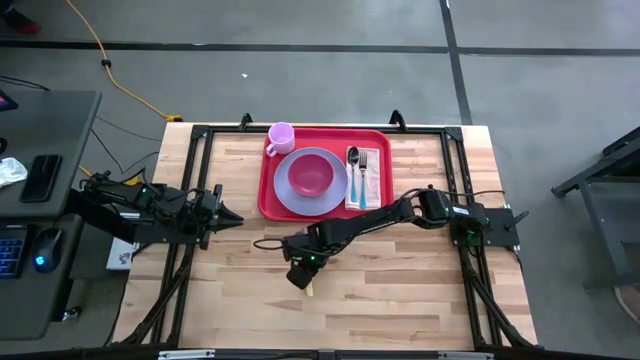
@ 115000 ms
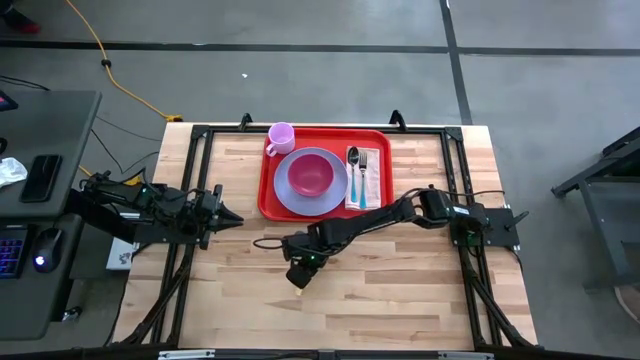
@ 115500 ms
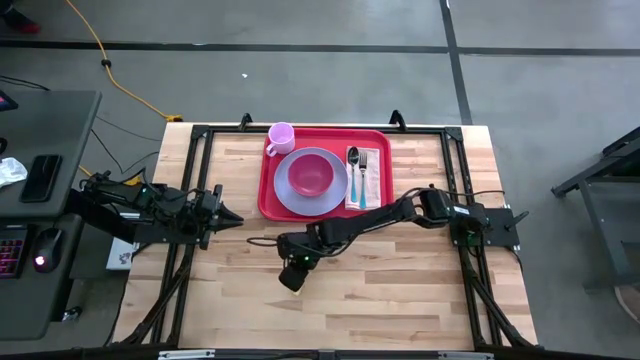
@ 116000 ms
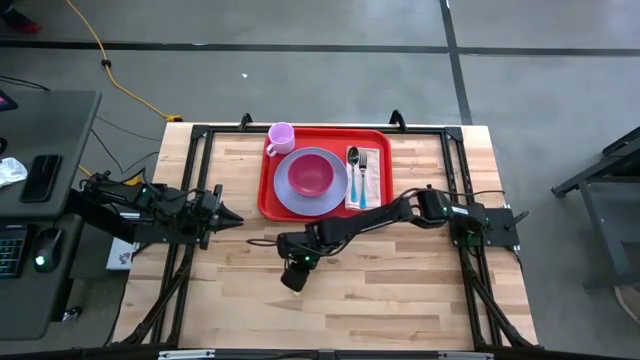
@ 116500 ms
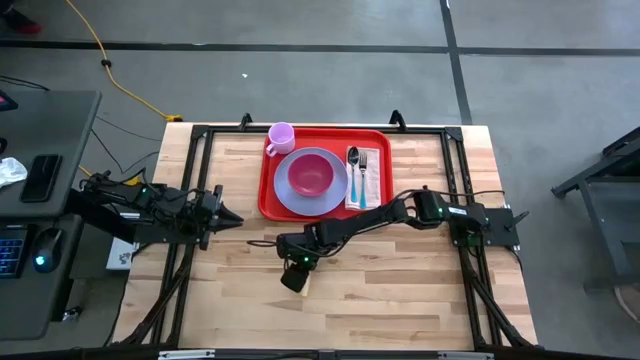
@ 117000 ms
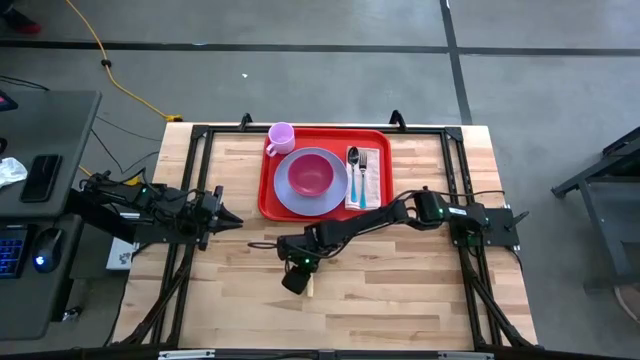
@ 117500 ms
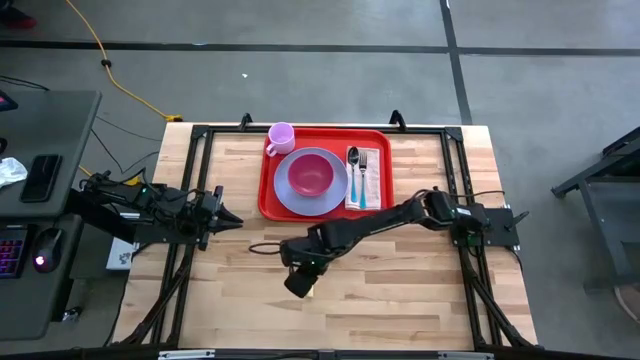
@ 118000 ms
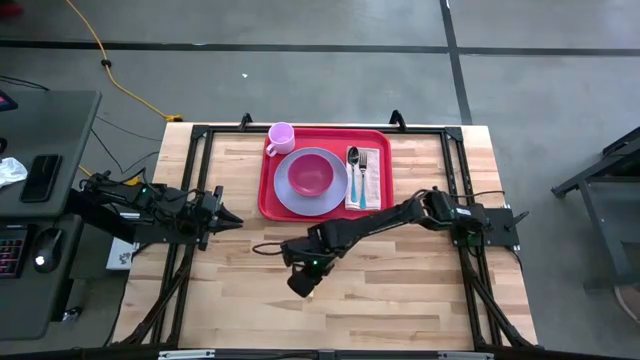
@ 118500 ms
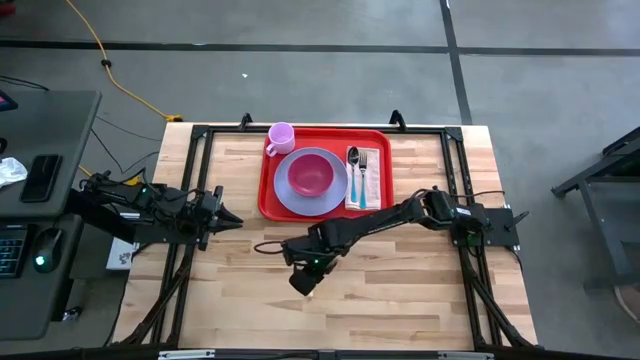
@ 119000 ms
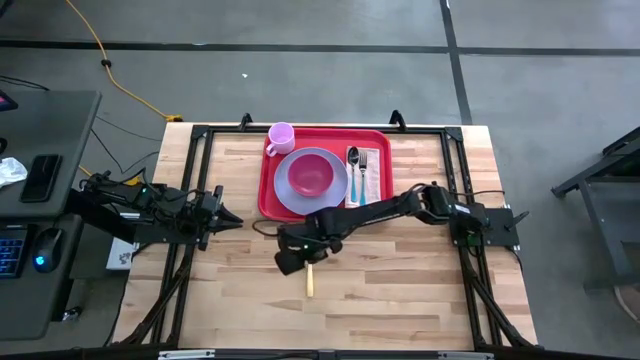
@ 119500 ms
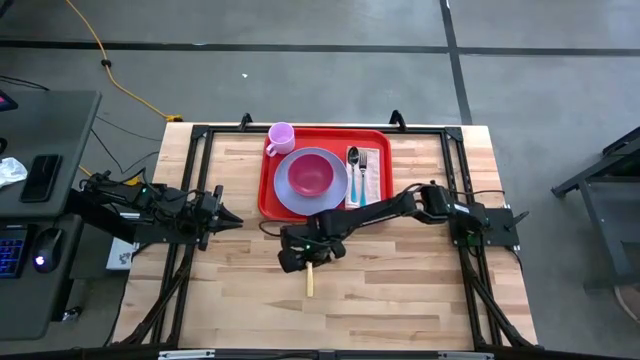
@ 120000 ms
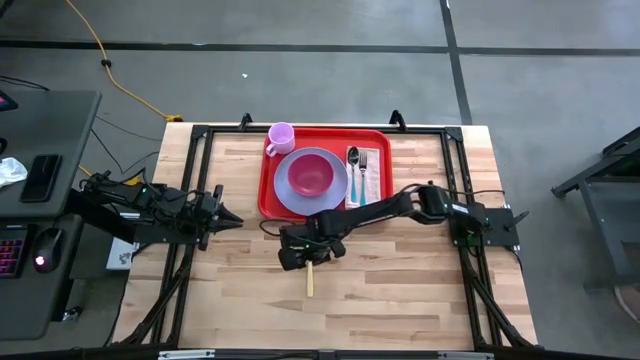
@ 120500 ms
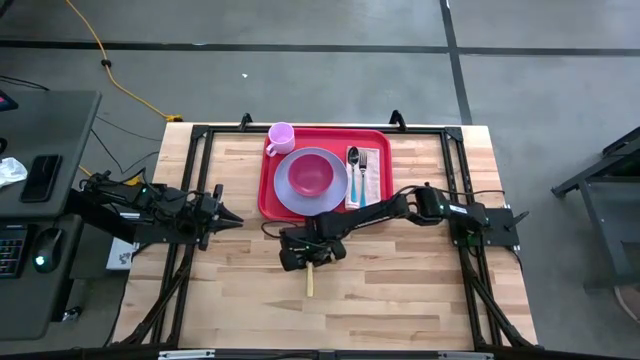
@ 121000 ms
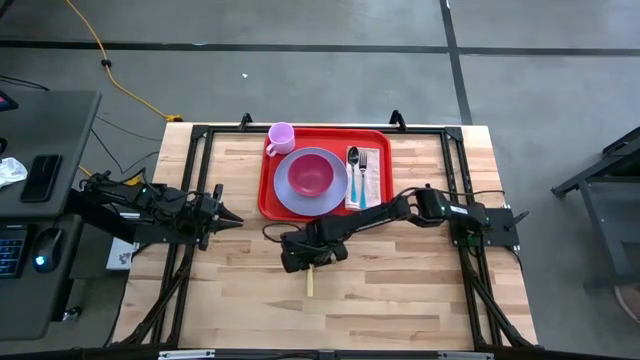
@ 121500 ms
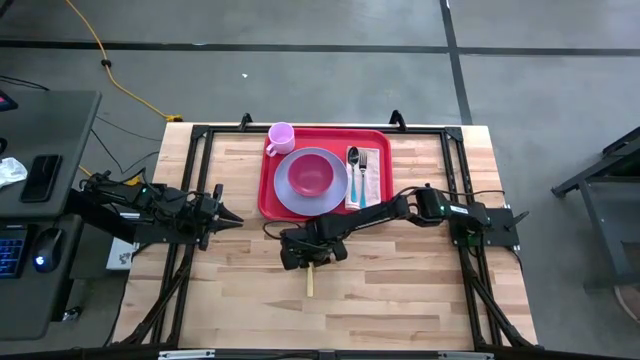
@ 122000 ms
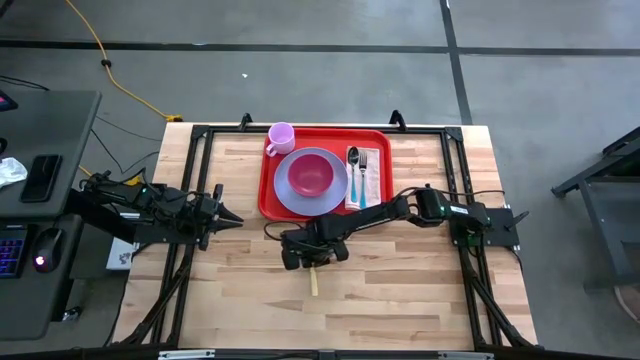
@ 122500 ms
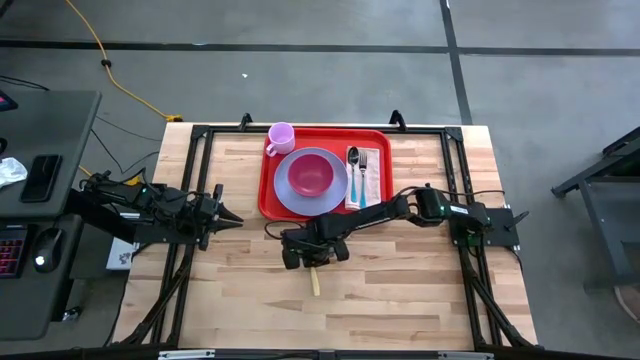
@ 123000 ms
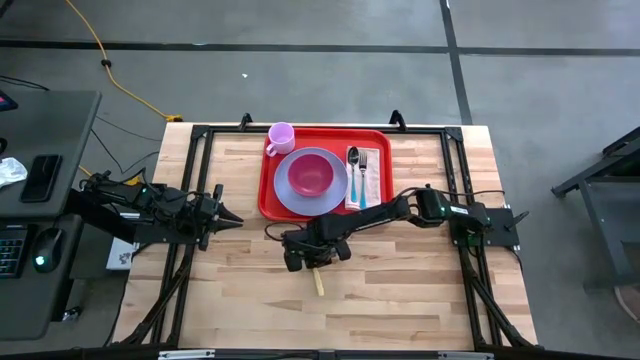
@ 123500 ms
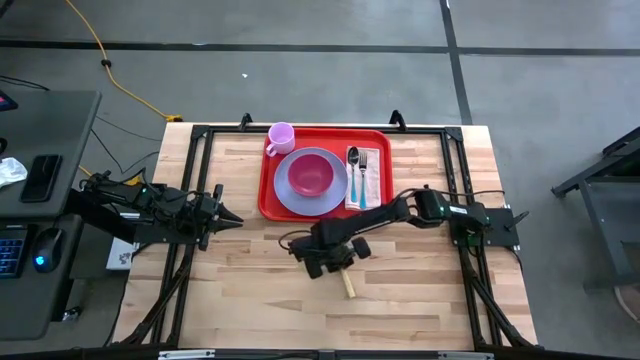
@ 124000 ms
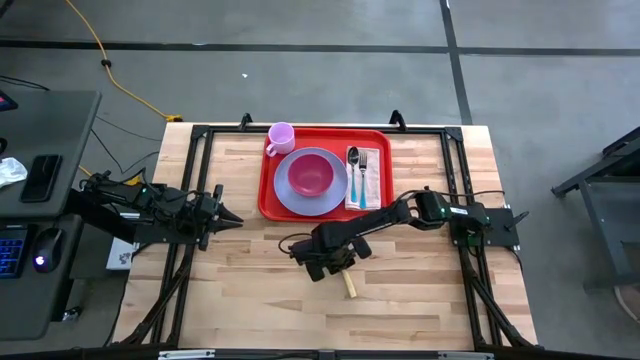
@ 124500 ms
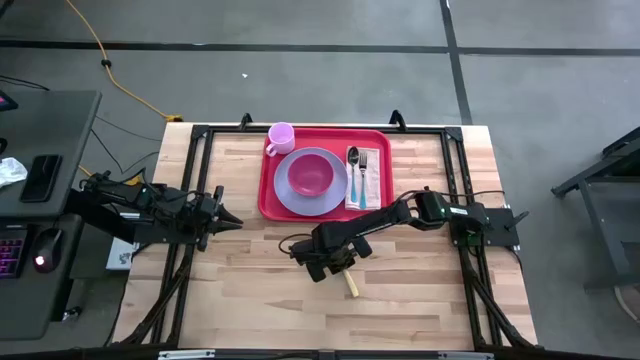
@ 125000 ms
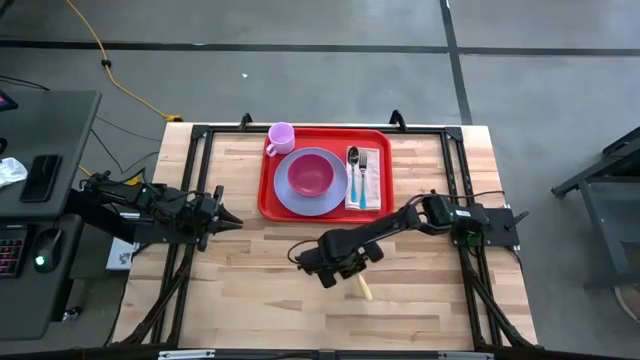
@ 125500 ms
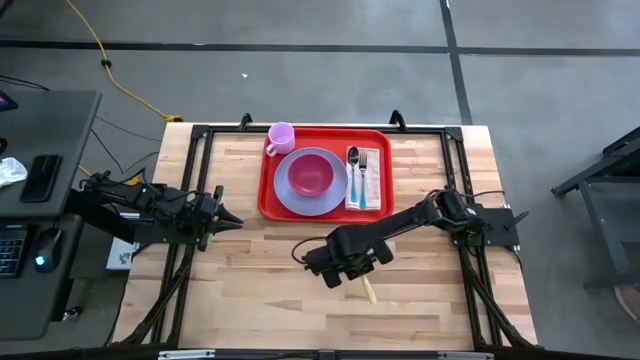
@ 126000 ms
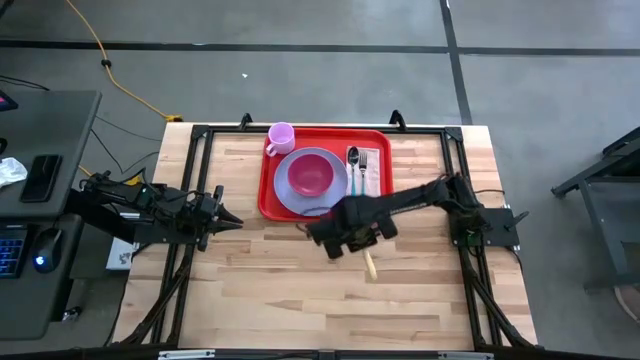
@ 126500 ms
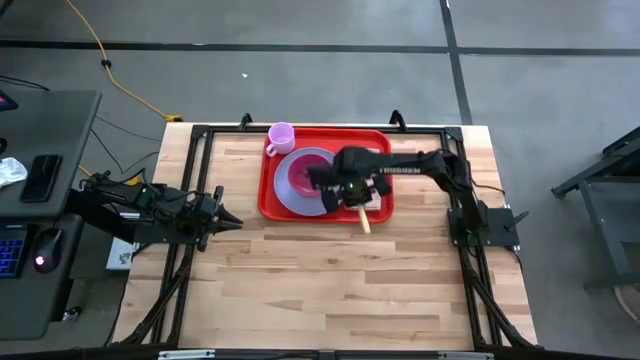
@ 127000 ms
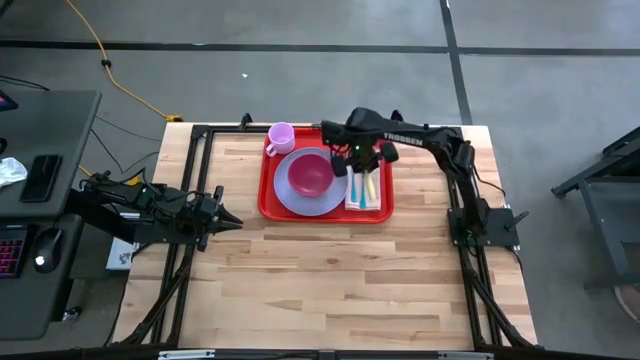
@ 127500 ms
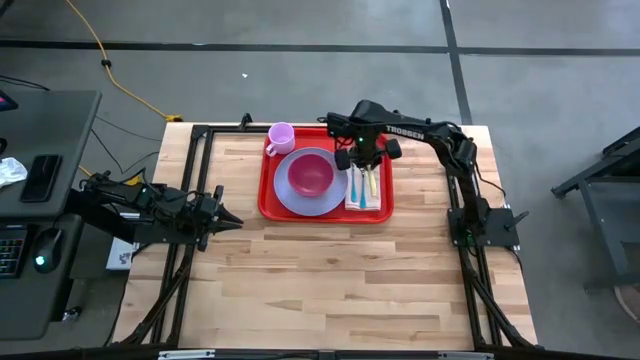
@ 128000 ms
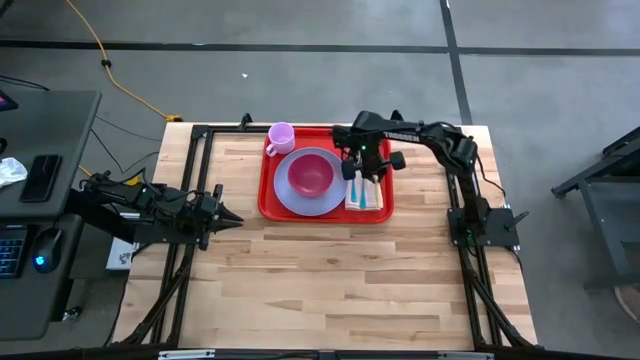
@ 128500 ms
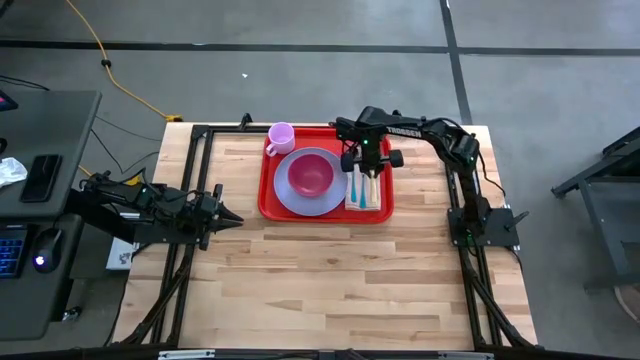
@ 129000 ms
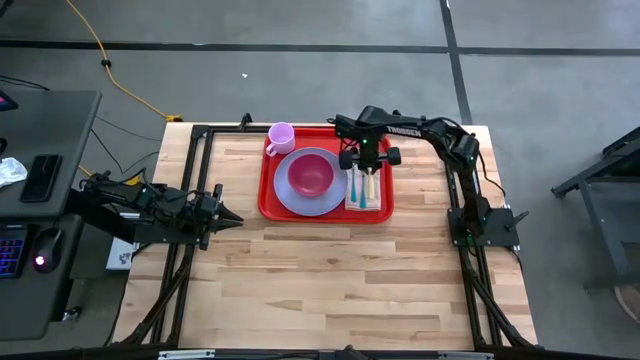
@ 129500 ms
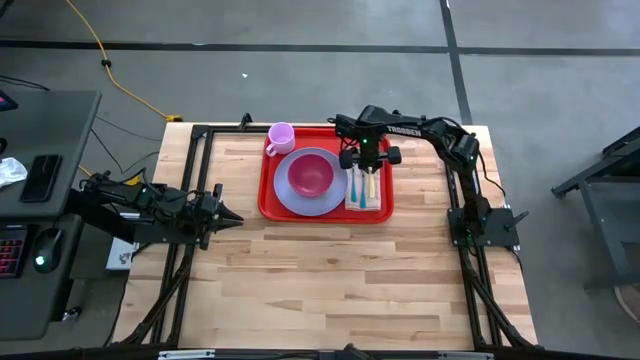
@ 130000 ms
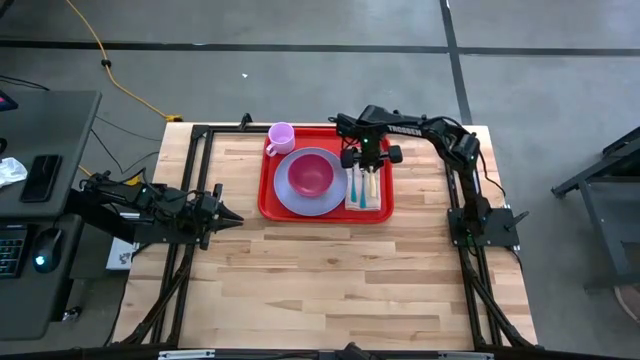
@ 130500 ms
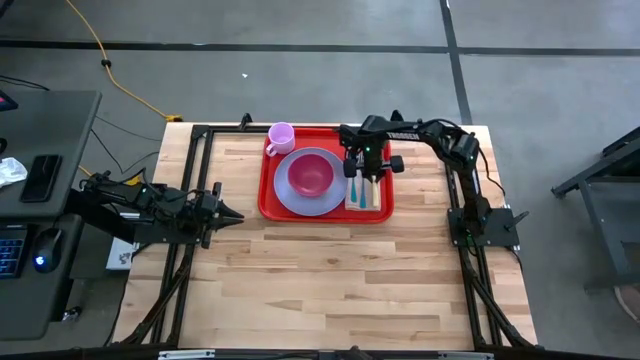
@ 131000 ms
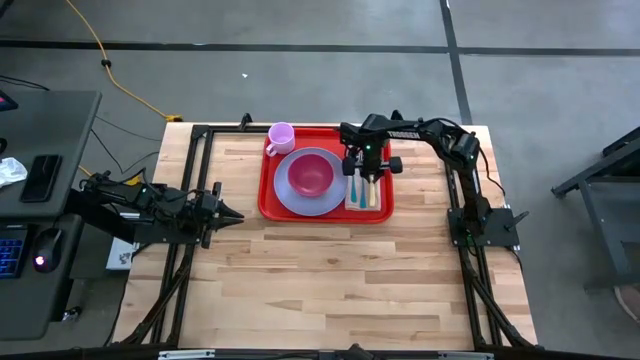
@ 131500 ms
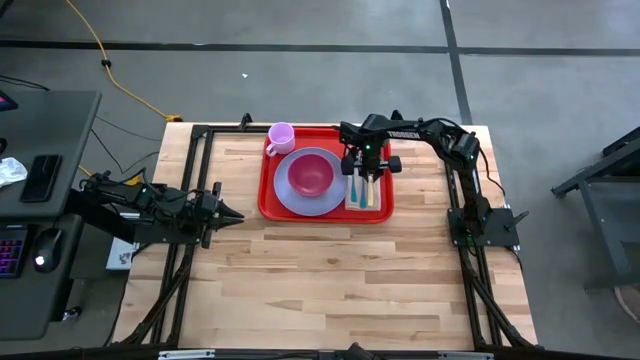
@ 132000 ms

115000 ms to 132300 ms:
Task: Set up tray
Put the yellow knife to the right of the blue fork on the light pink napkin

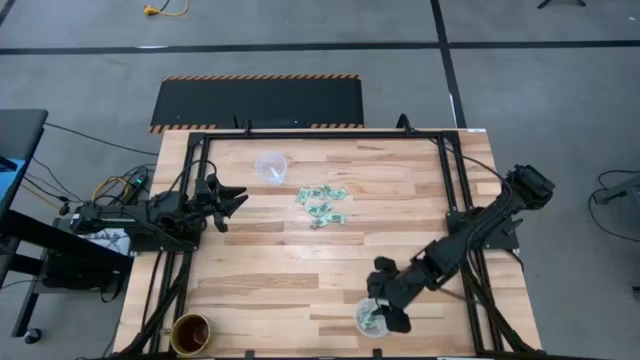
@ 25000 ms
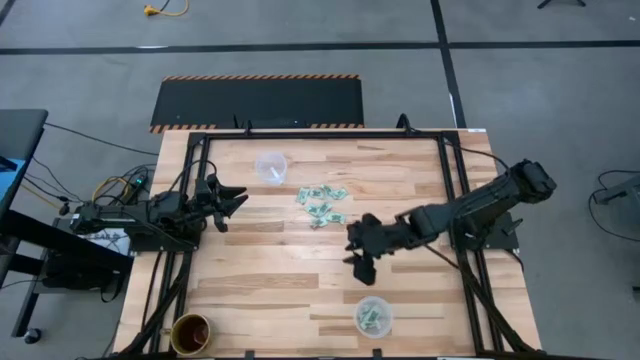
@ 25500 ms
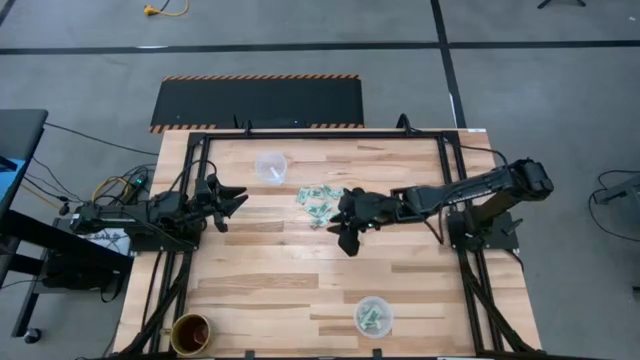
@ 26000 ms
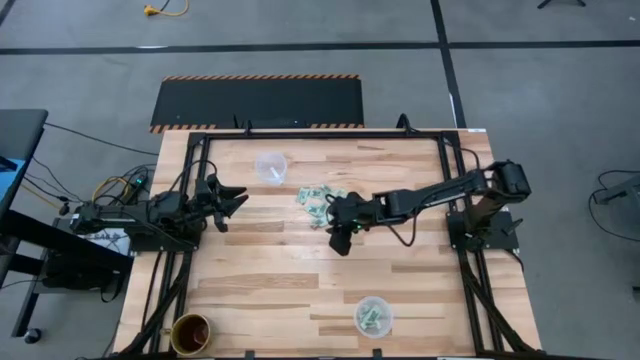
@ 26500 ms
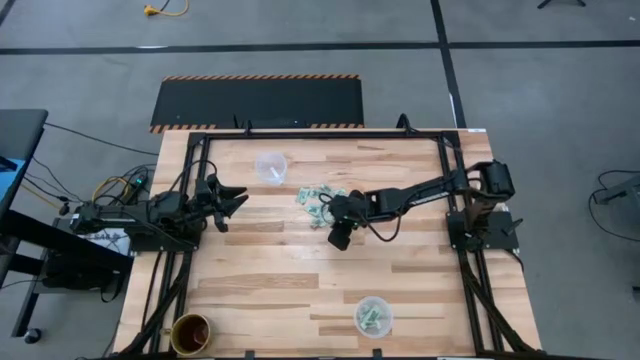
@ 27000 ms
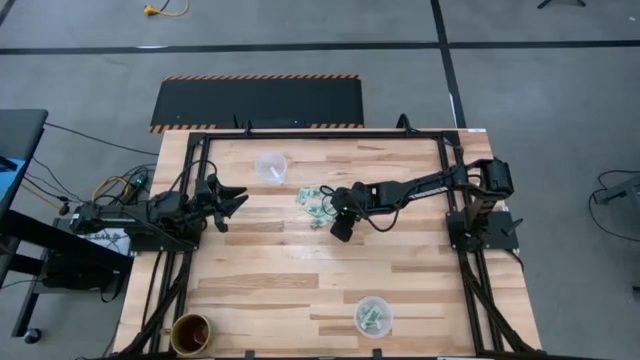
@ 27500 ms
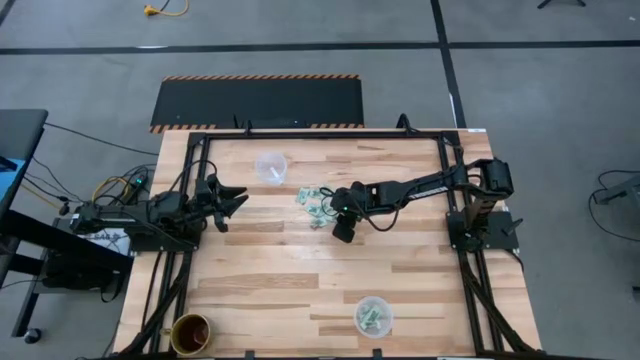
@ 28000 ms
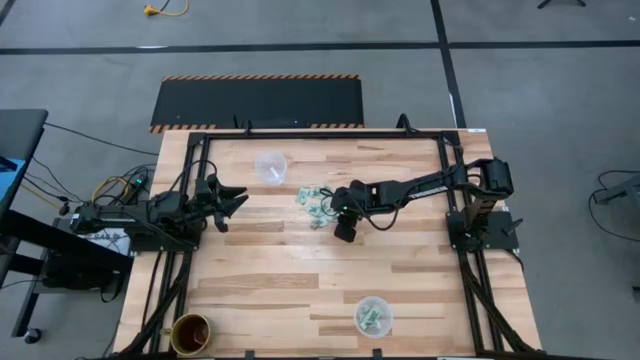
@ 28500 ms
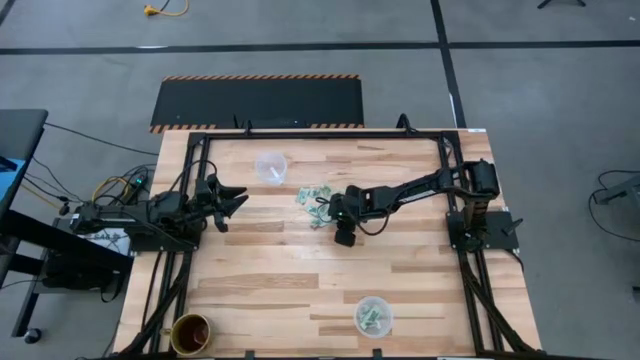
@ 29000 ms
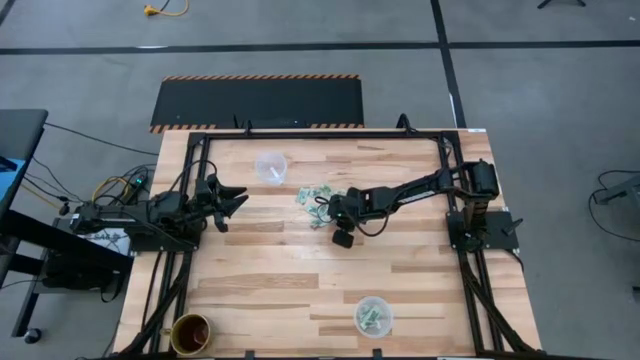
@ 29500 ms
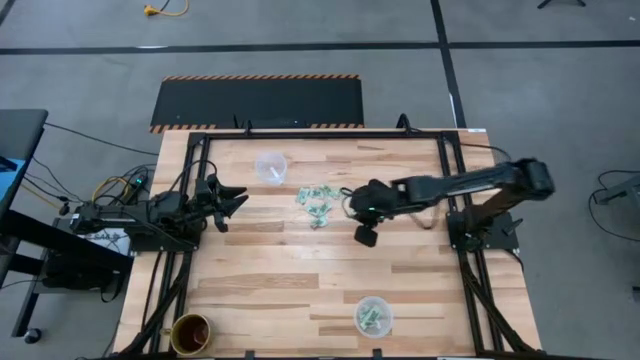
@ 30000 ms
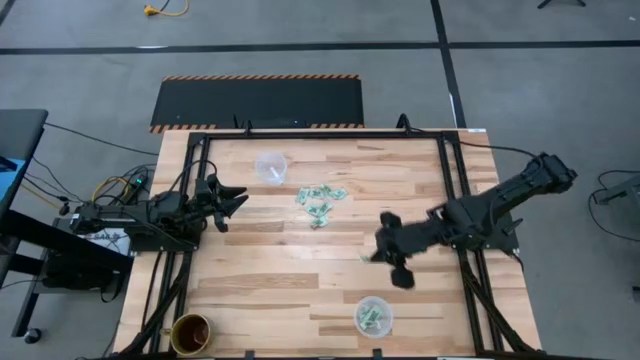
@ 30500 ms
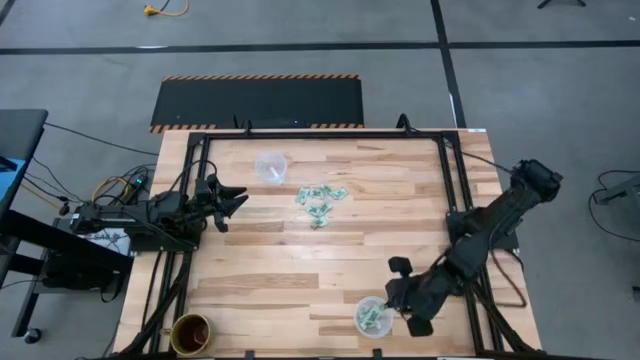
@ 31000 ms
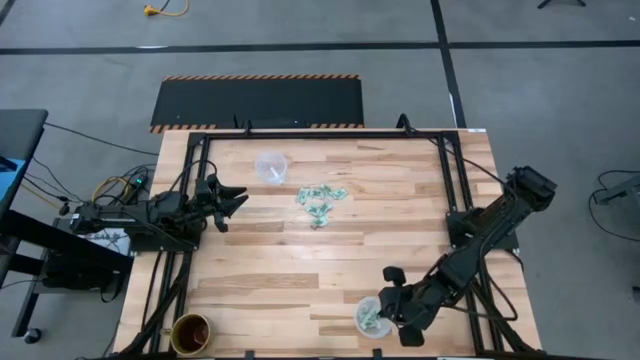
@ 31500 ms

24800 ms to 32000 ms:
Task: Pick and place Stevia / Truvia into bins
Put the white stevia packet into the bottom transparent container
